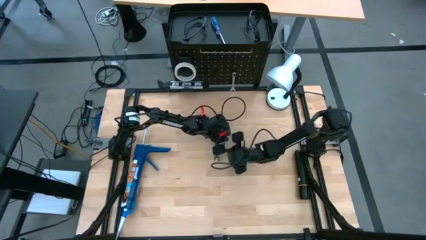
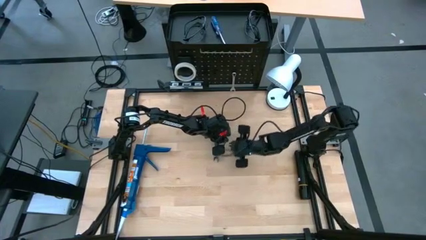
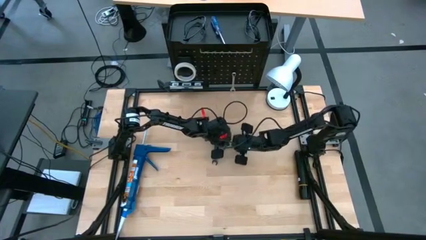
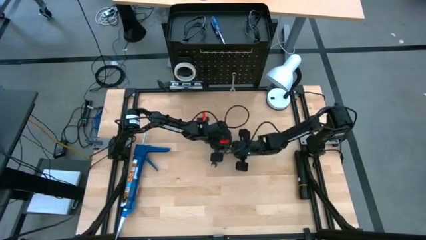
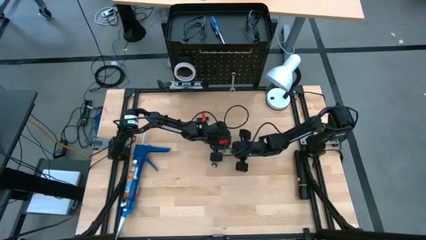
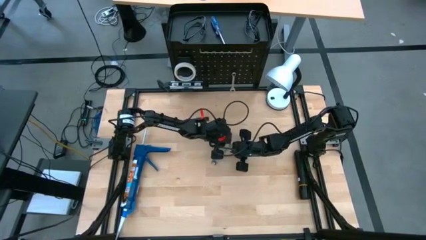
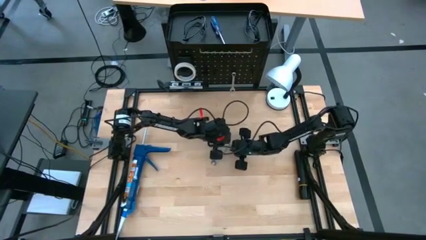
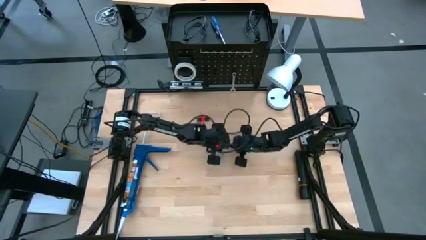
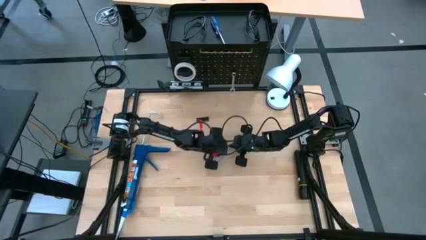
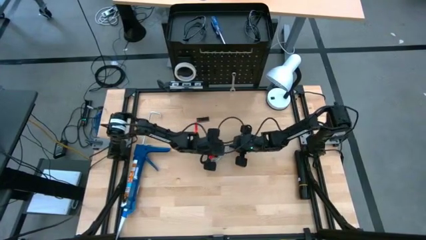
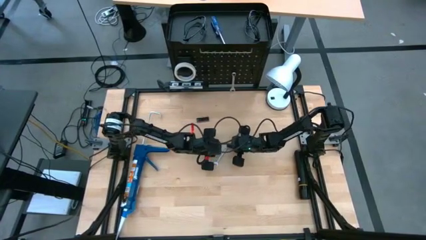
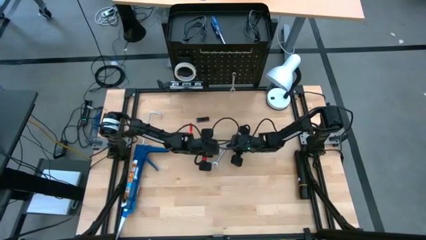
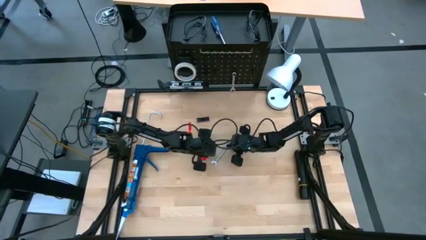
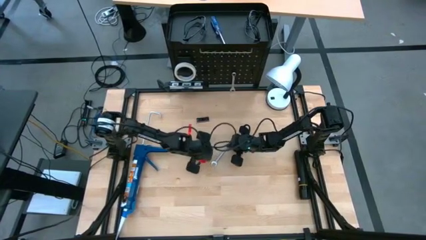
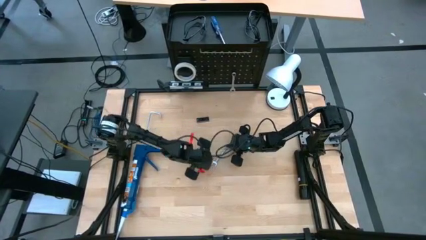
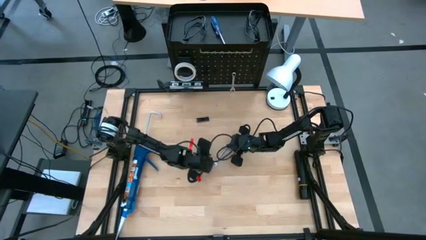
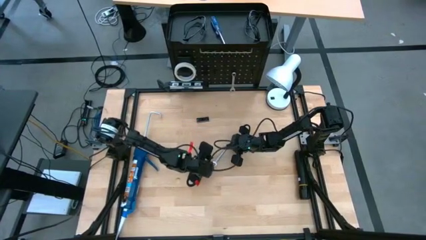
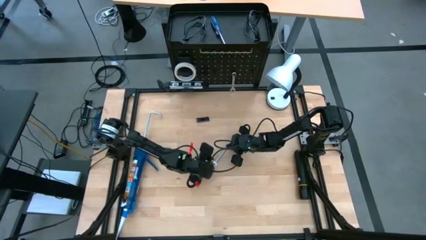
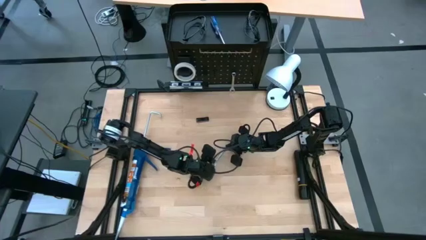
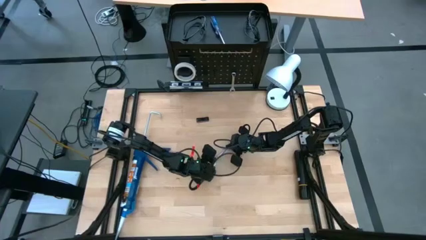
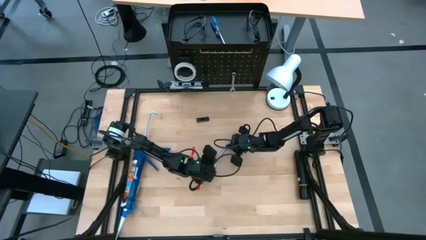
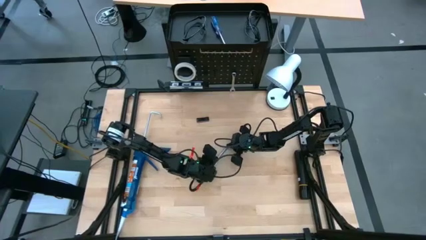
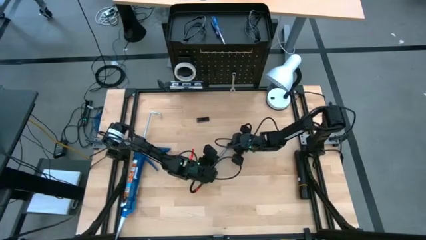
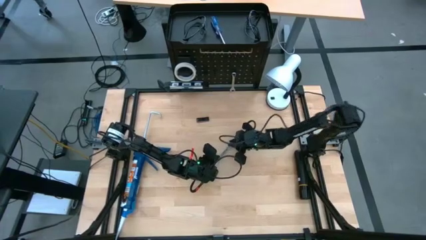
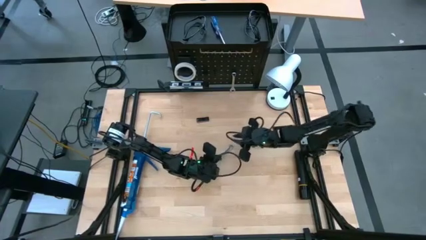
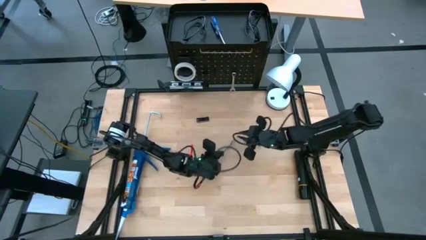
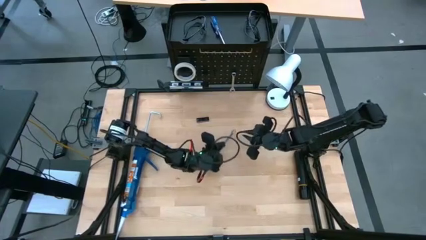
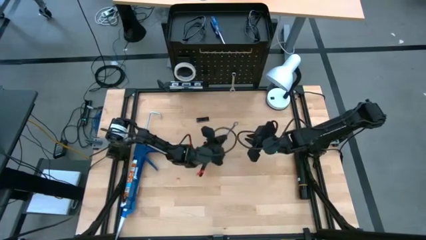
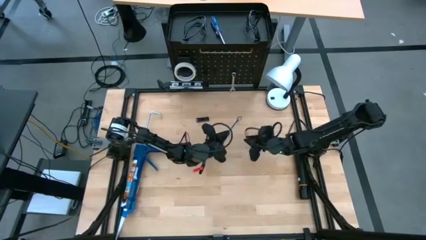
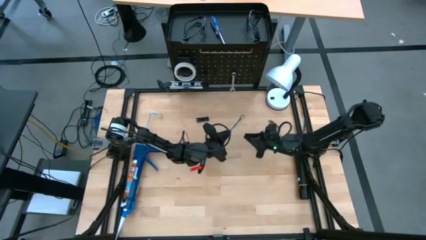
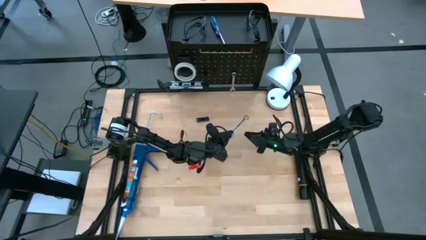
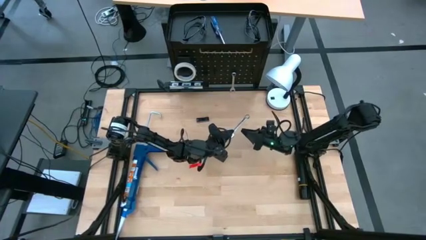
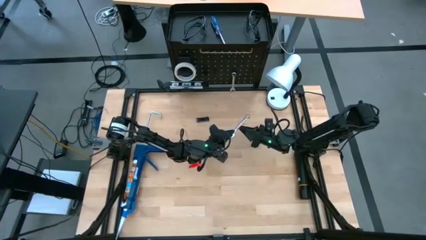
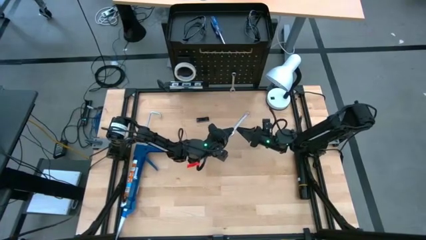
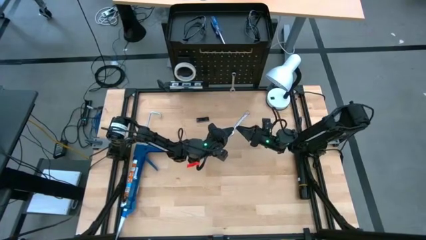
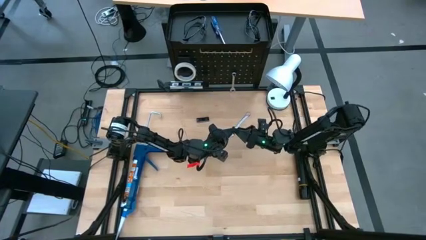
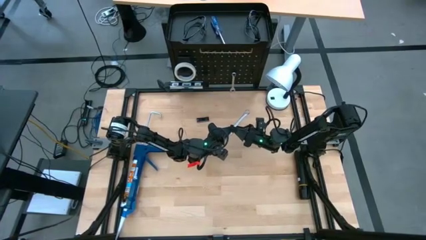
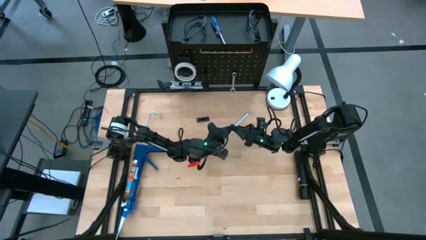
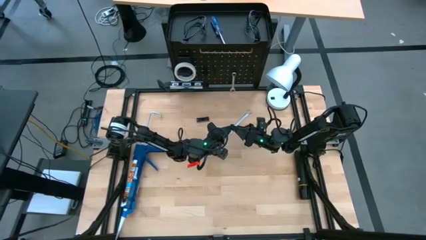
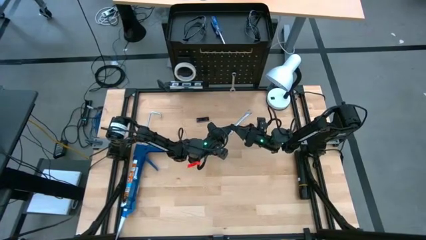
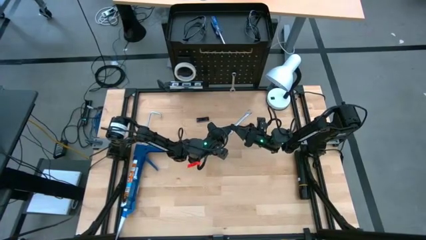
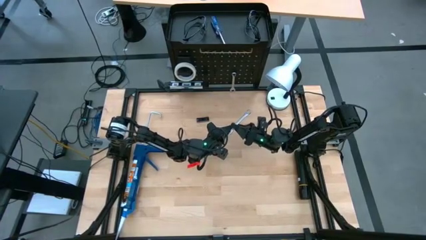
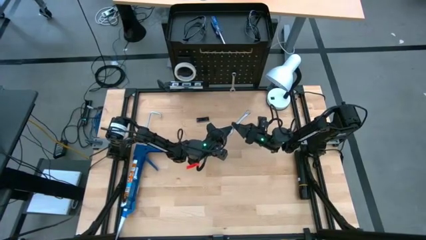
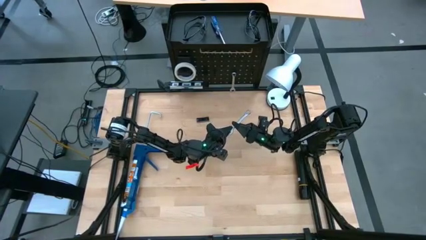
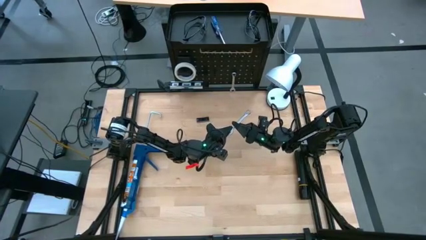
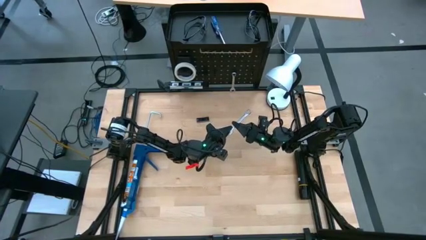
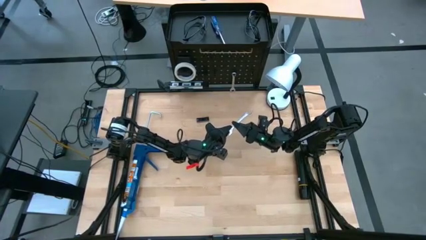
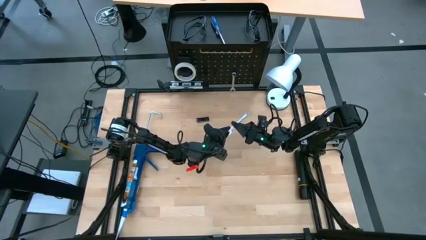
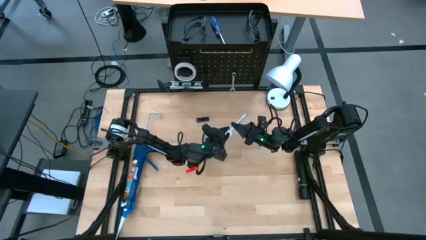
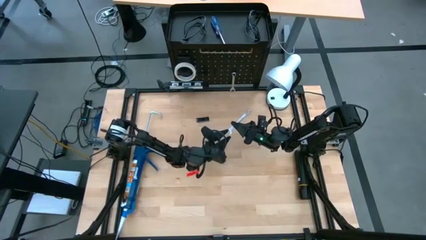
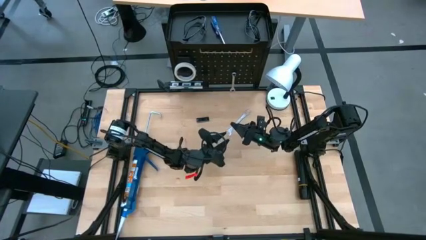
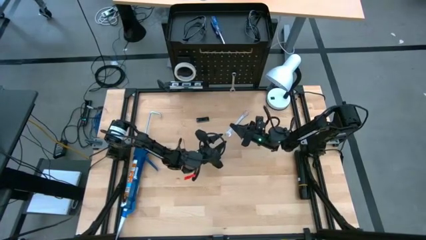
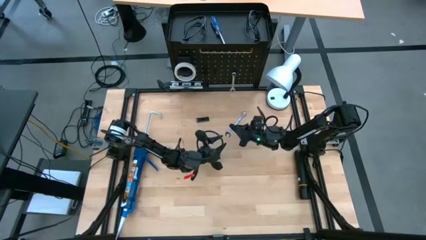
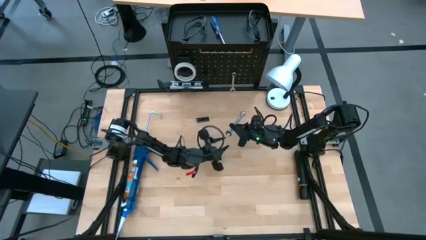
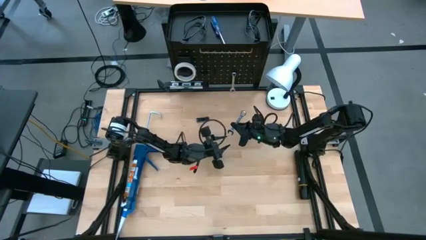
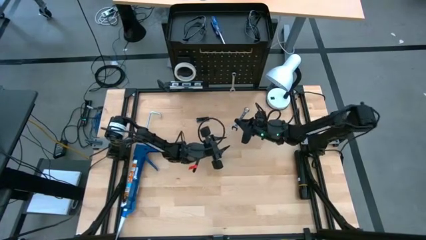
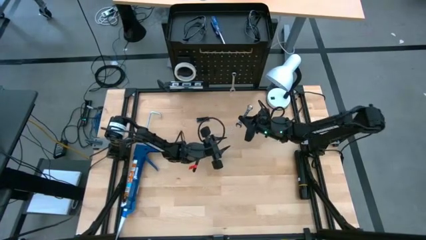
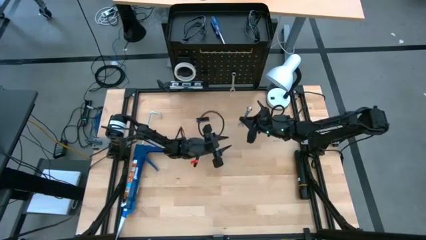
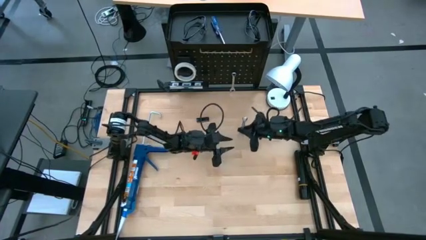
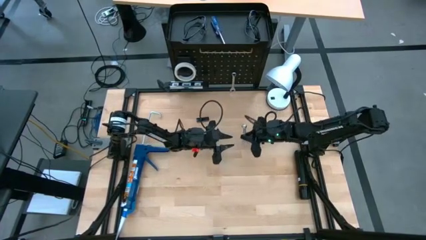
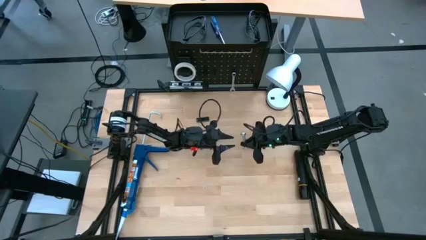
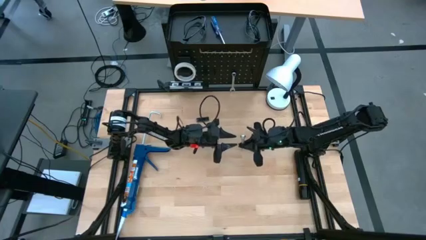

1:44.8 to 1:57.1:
Task: Hang tools onto peg board
Hang the wrench on the pegboard
